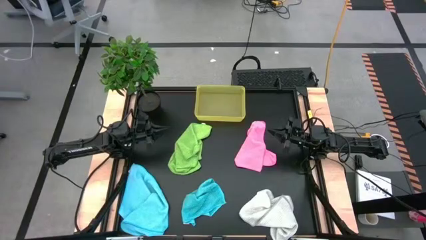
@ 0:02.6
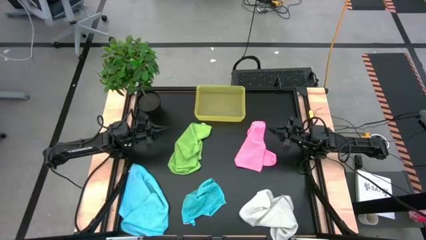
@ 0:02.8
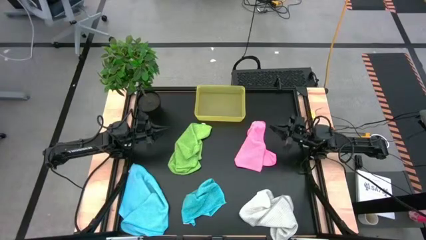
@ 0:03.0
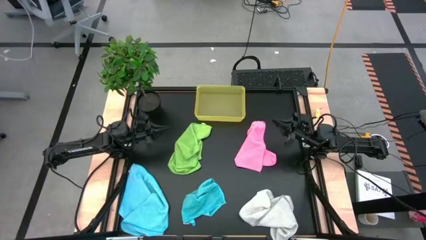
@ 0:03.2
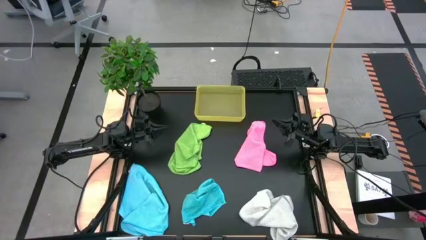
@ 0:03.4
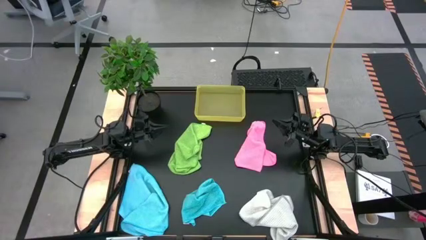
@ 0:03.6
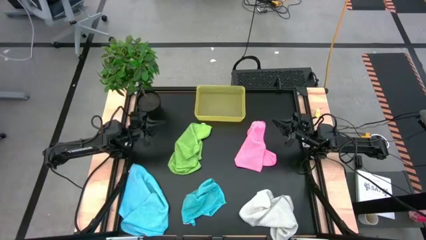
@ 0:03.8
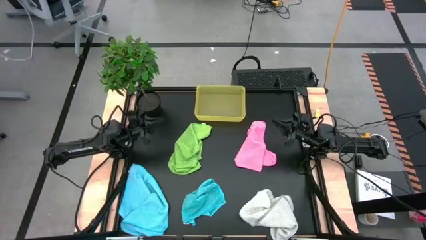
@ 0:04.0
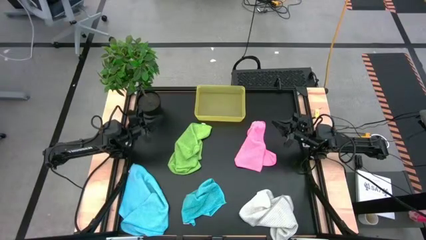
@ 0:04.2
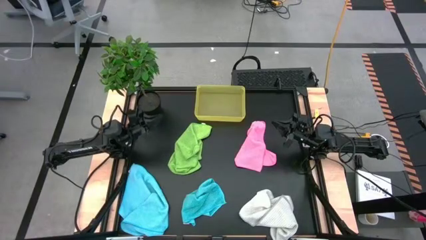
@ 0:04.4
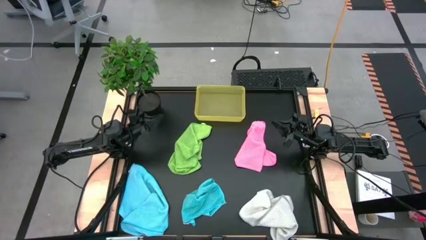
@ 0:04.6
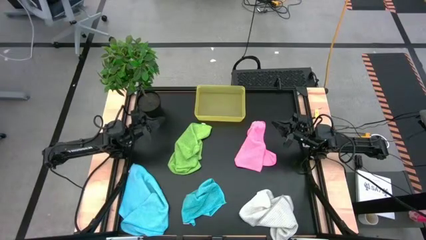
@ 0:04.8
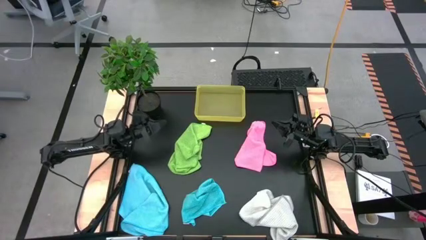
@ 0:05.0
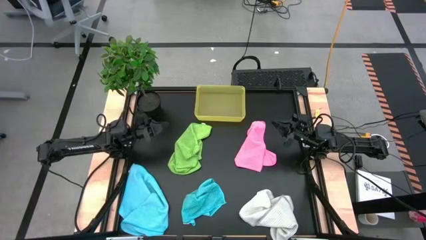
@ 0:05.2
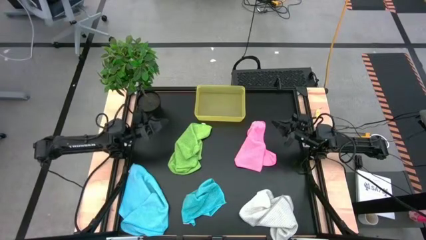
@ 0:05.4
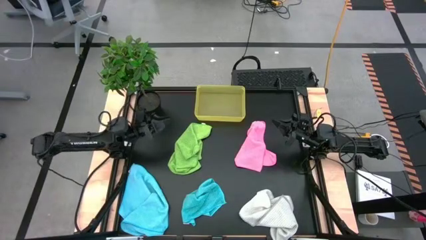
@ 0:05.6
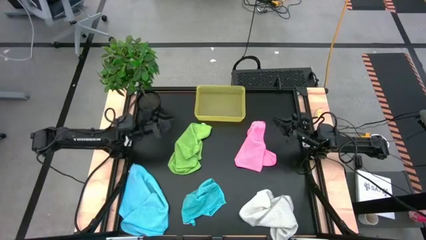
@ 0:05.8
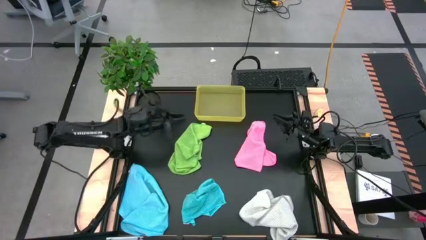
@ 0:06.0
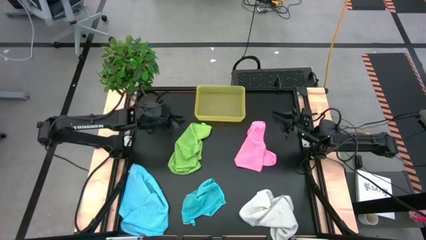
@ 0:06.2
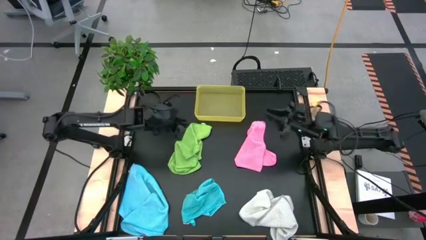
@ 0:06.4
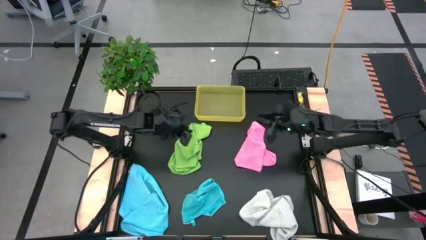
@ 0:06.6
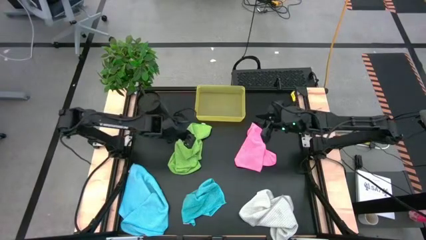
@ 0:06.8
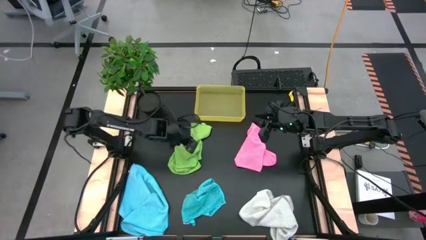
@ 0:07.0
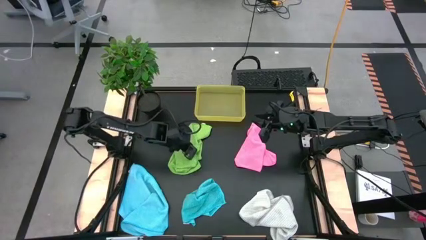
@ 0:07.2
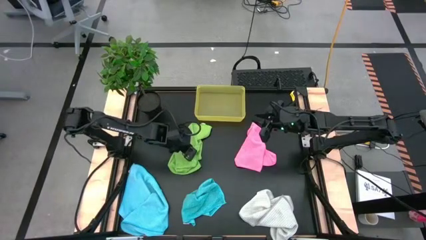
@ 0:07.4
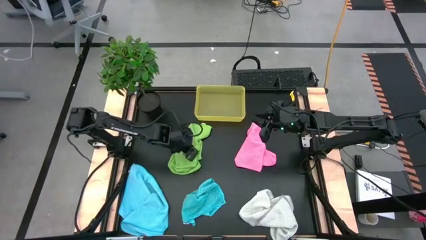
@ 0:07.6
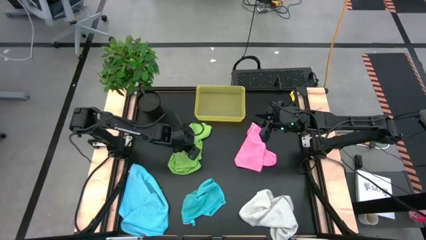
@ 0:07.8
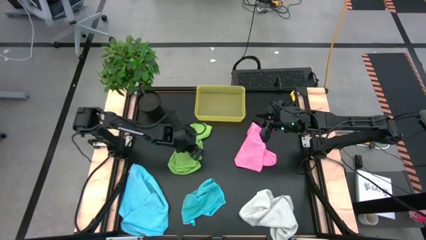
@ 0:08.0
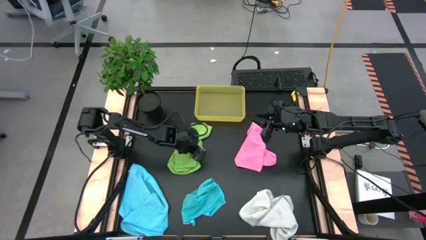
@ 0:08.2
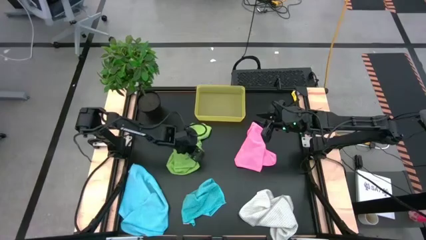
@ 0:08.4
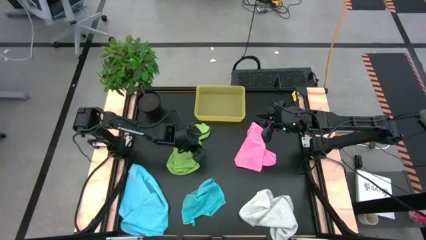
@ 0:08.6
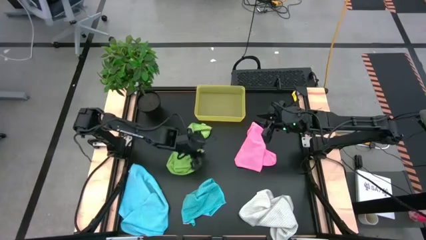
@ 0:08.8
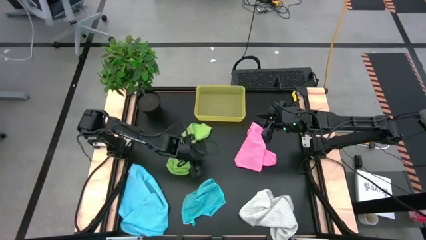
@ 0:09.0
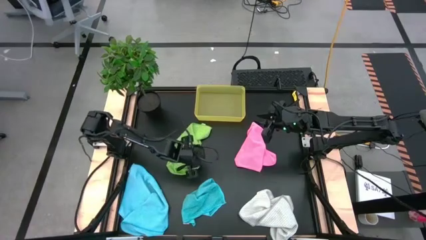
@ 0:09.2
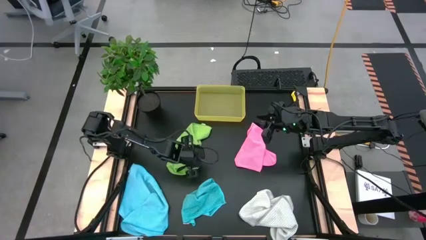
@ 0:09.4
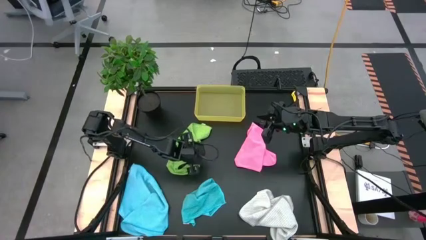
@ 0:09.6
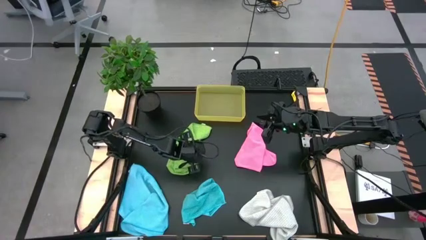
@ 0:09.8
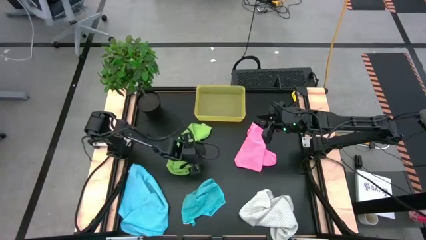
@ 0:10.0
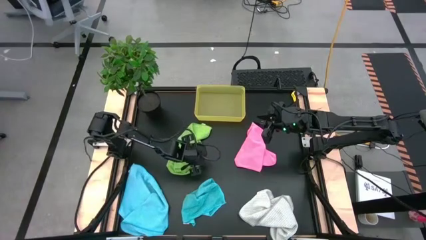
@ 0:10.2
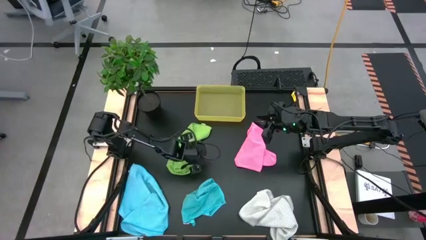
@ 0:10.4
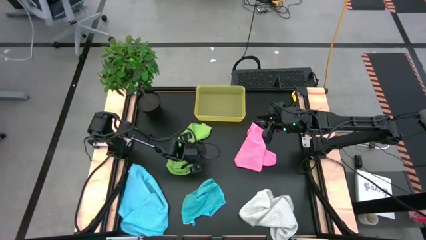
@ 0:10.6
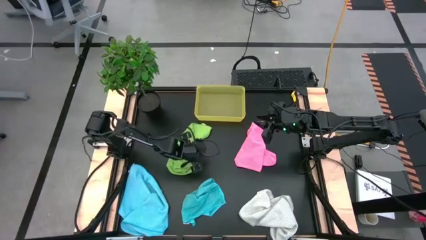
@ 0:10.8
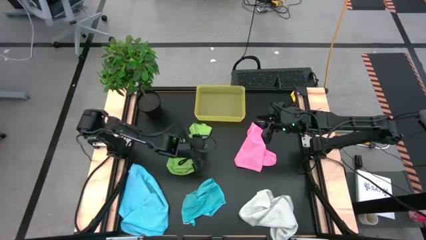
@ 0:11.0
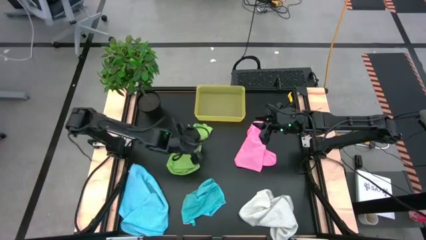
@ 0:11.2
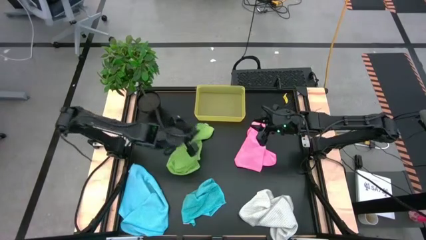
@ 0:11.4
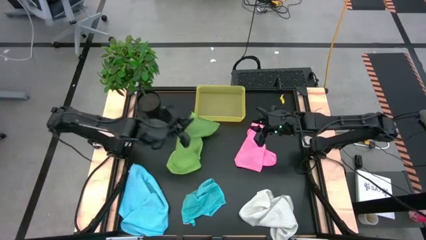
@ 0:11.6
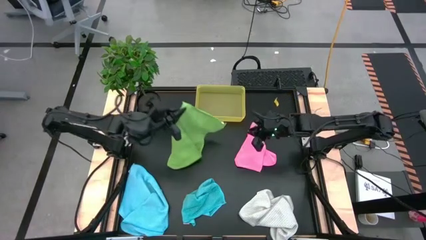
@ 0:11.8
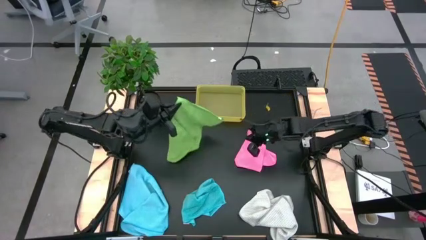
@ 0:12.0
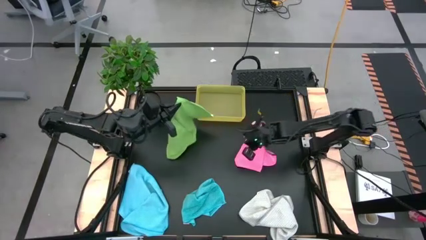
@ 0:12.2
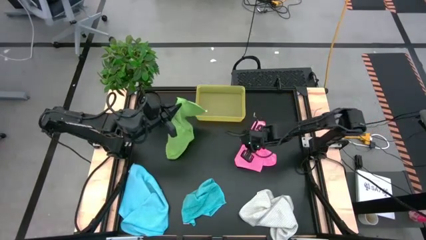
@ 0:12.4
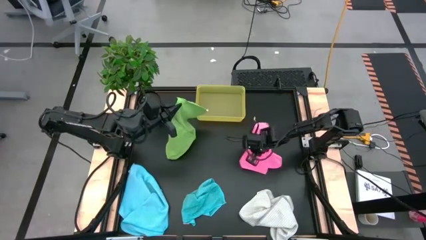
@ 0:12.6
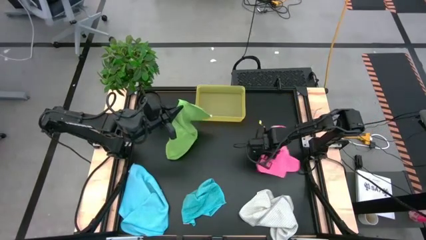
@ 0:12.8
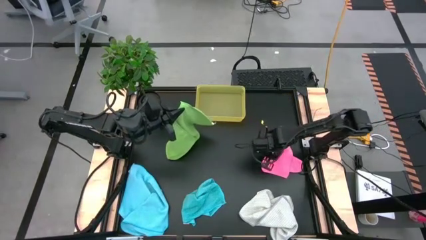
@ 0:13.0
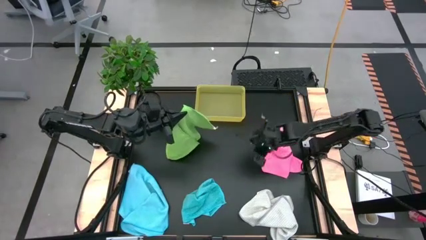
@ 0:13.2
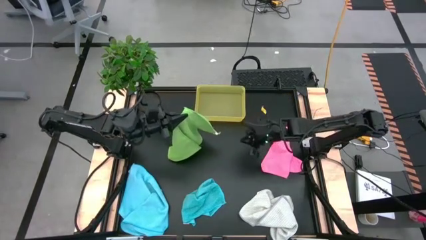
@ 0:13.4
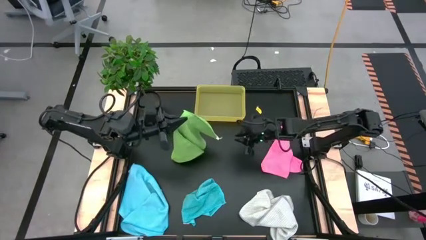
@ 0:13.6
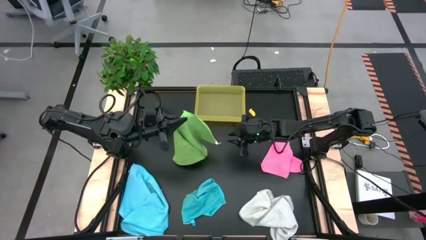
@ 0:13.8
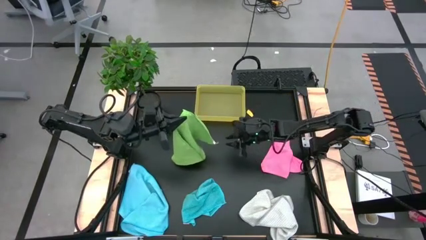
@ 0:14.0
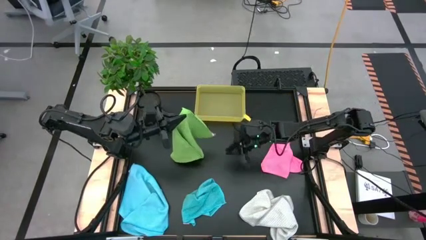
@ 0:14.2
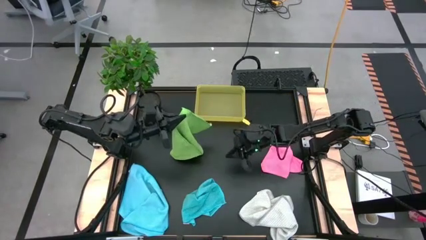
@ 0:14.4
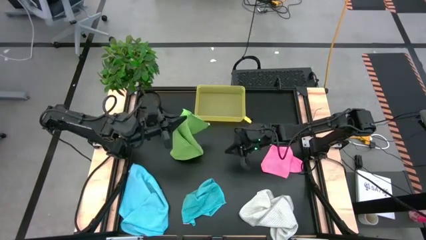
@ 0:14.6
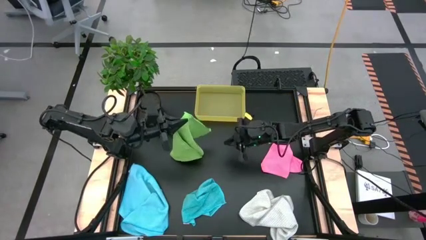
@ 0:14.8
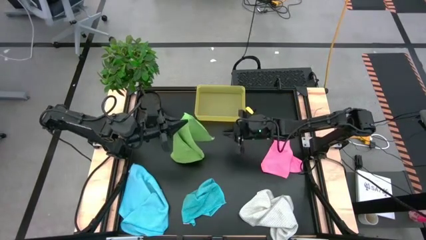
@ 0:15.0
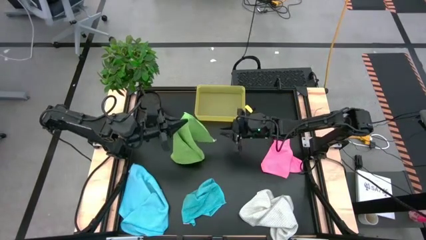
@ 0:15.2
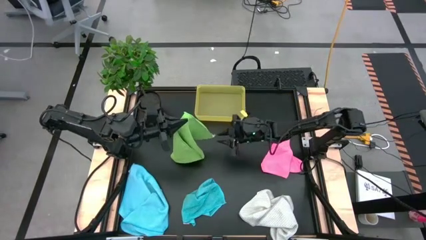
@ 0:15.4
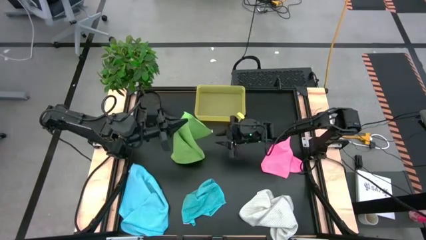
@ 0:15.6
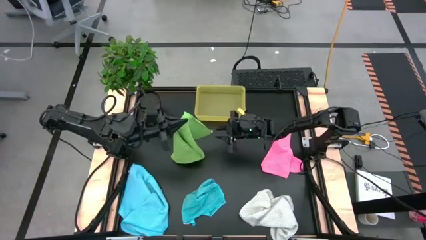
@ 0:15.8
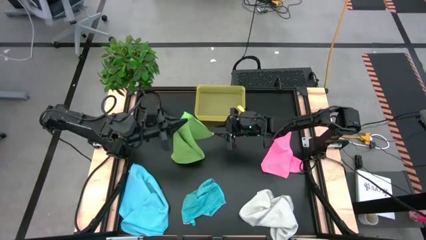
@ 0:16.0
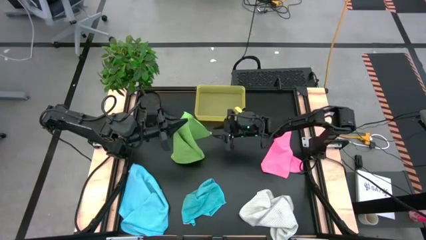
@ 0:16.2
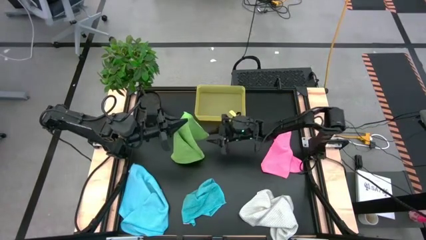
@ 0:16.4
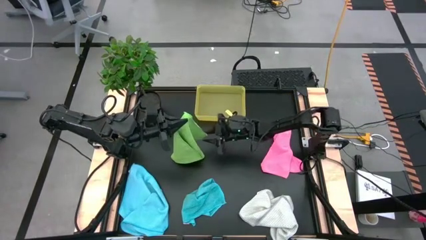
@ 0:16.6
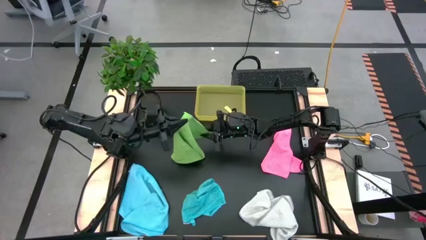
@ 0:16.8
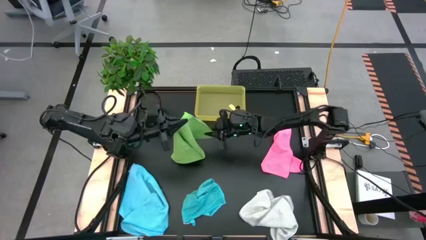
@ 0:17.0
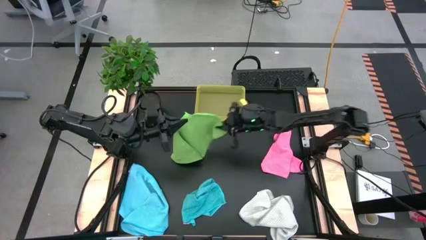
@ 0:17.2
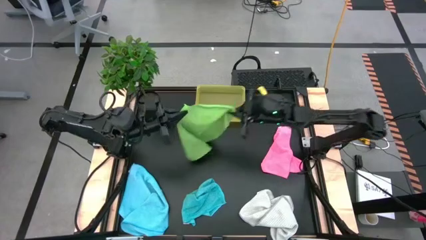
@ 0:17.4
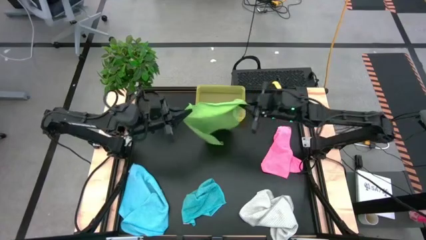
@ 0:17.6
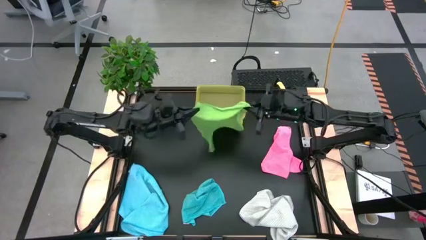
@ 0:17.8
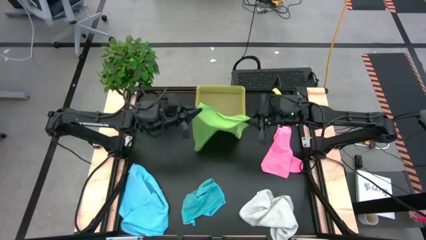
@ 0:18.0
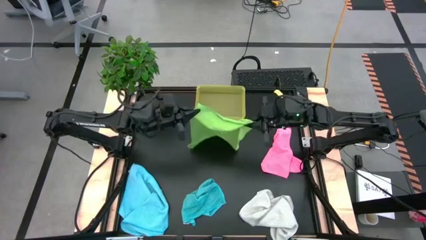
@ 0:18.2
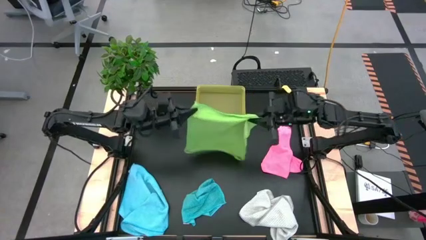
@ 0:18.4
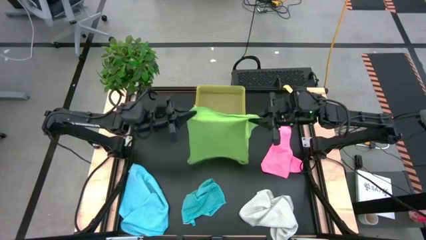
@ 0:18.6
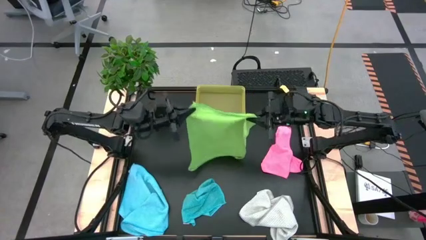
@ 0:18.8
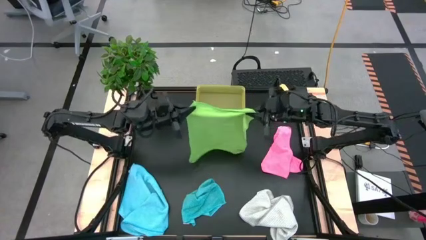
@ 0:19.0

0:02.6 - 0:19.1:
Task: Fold microfiber towels
Fold the green microfiber cloth
